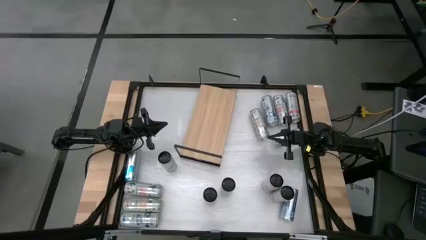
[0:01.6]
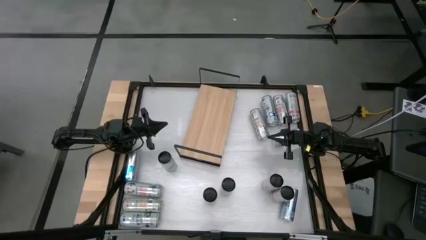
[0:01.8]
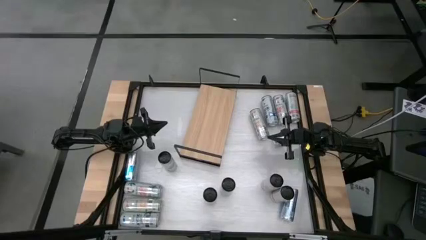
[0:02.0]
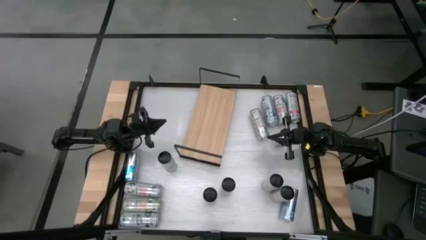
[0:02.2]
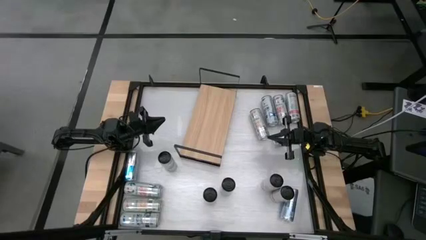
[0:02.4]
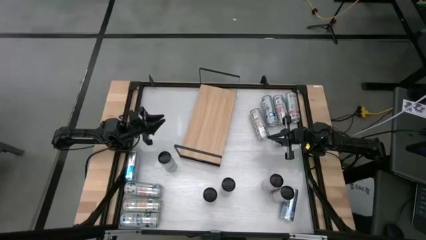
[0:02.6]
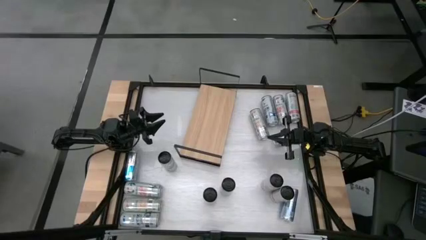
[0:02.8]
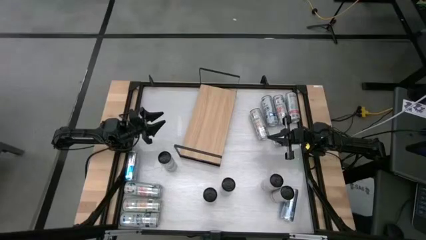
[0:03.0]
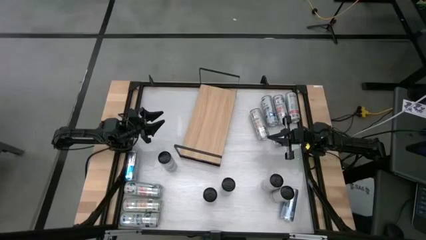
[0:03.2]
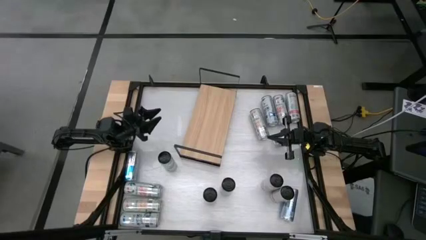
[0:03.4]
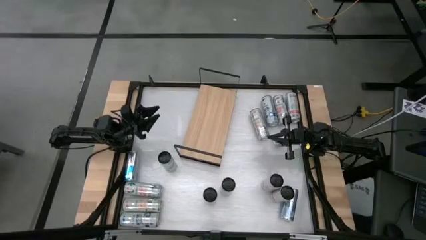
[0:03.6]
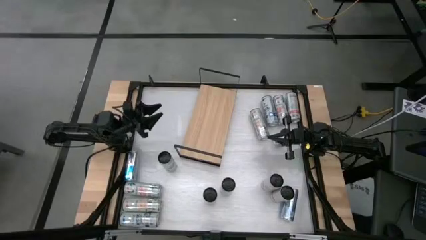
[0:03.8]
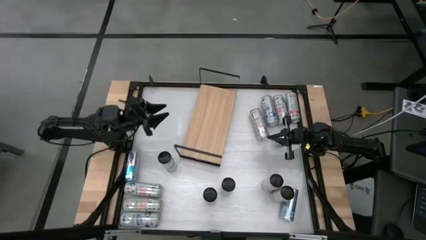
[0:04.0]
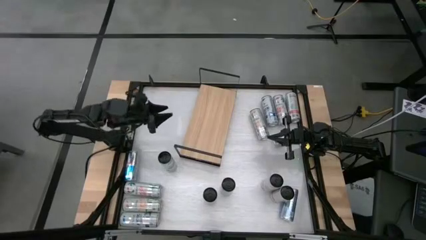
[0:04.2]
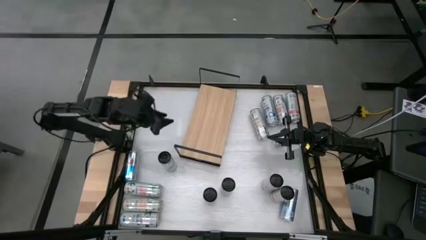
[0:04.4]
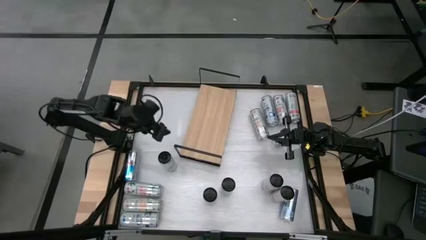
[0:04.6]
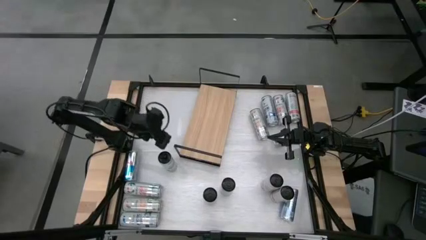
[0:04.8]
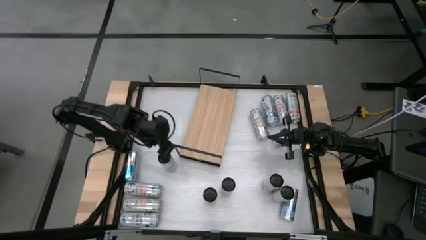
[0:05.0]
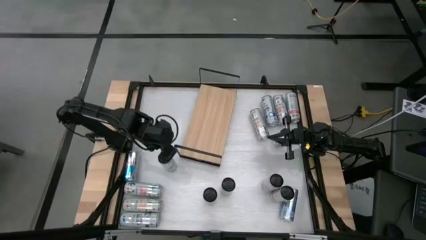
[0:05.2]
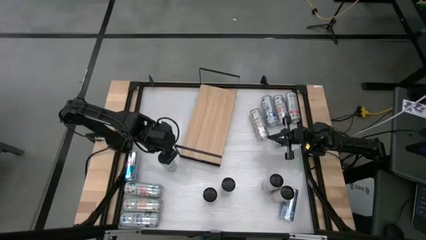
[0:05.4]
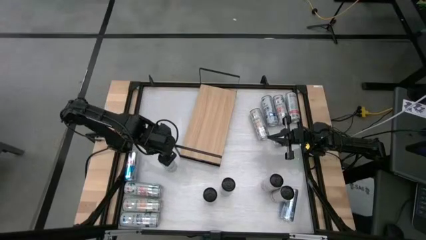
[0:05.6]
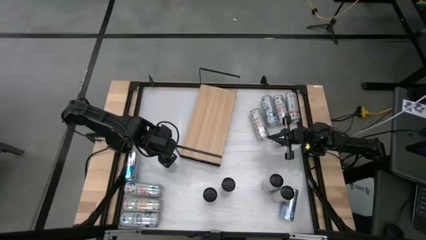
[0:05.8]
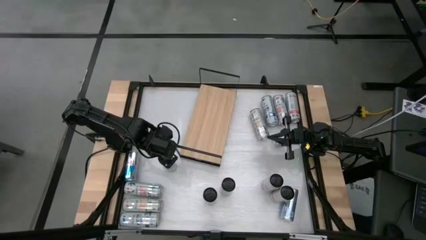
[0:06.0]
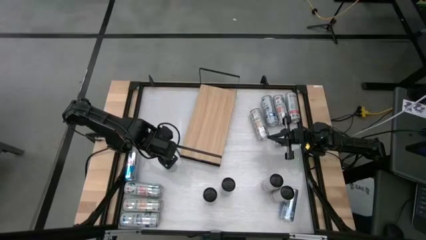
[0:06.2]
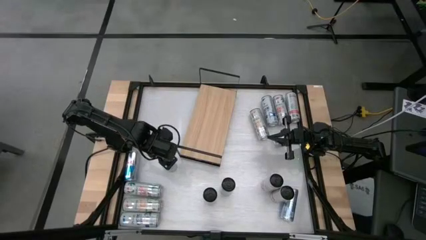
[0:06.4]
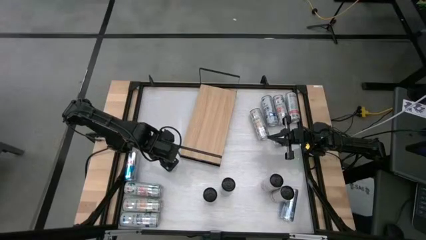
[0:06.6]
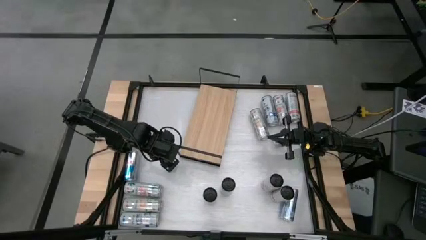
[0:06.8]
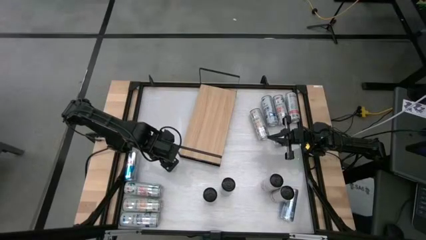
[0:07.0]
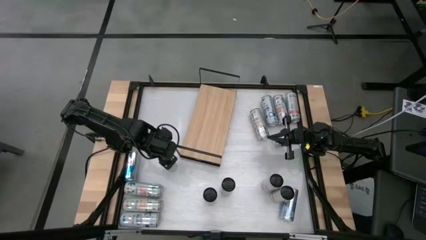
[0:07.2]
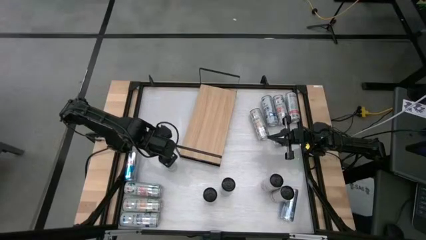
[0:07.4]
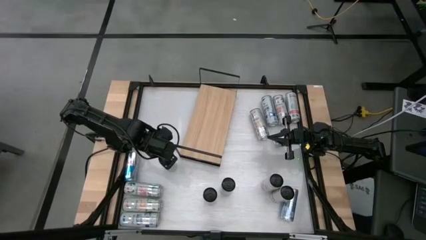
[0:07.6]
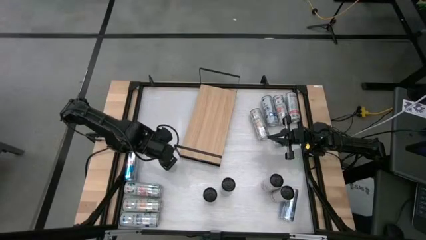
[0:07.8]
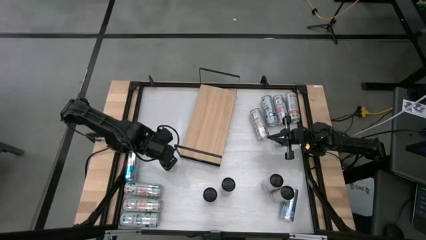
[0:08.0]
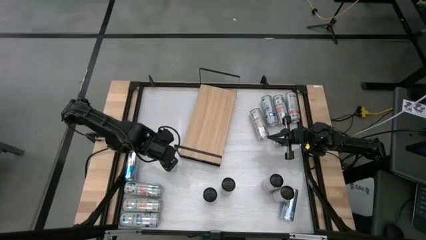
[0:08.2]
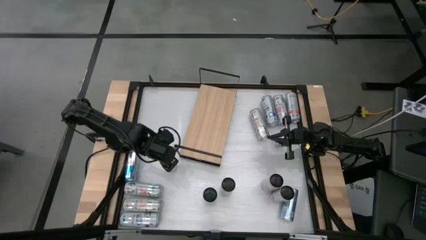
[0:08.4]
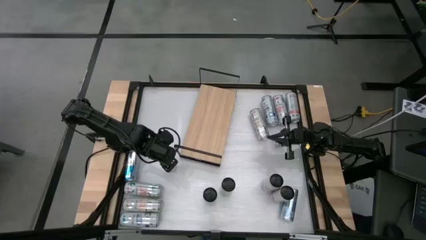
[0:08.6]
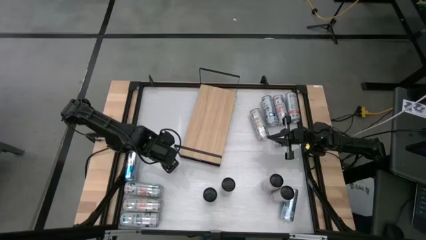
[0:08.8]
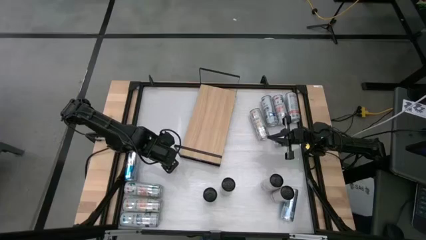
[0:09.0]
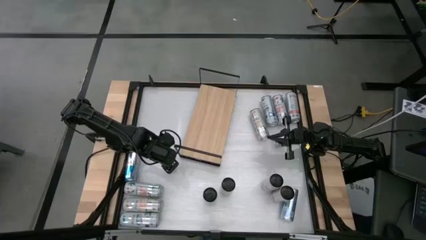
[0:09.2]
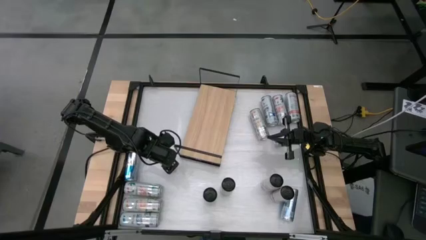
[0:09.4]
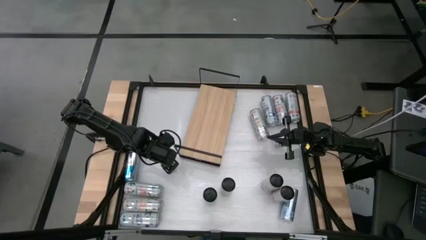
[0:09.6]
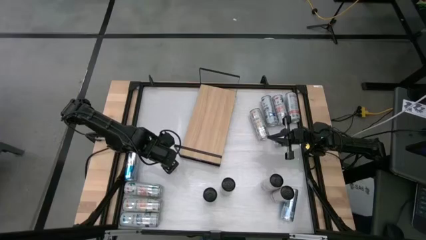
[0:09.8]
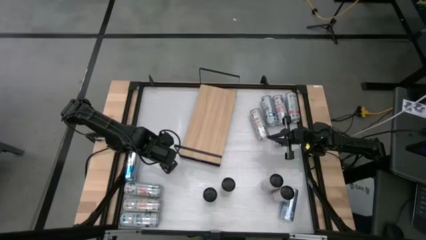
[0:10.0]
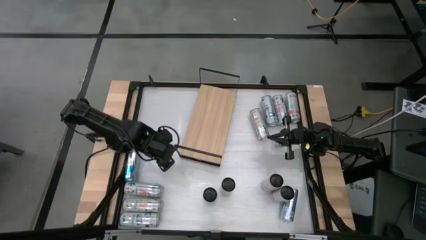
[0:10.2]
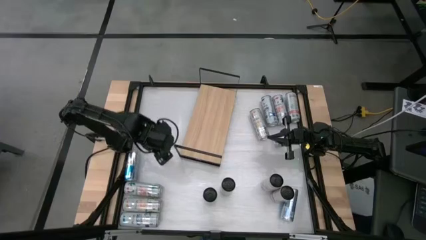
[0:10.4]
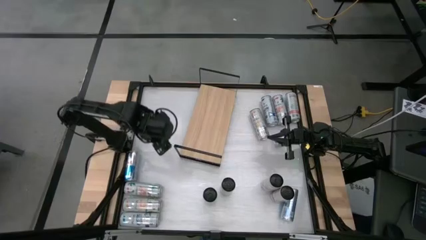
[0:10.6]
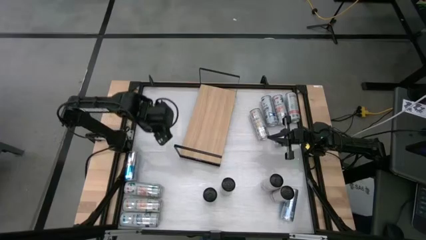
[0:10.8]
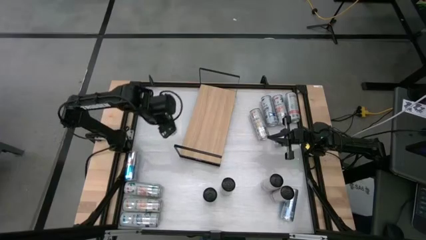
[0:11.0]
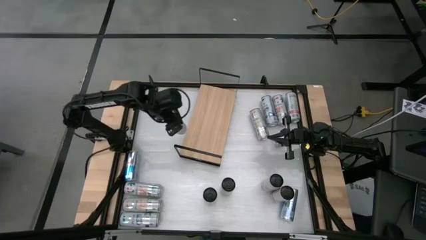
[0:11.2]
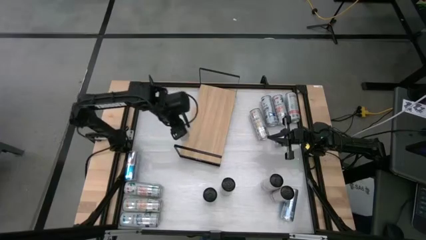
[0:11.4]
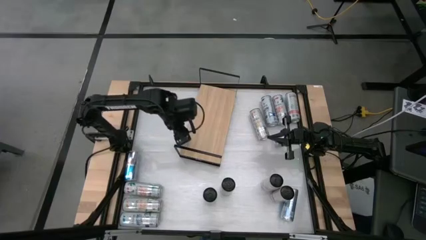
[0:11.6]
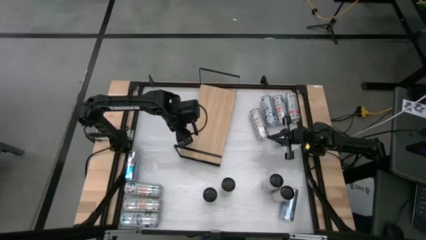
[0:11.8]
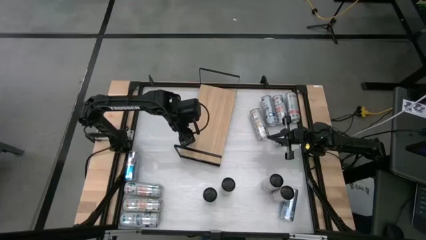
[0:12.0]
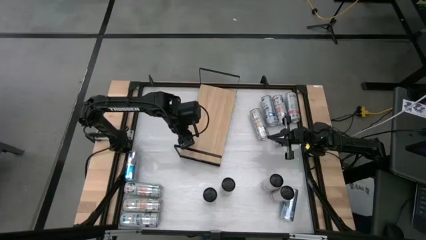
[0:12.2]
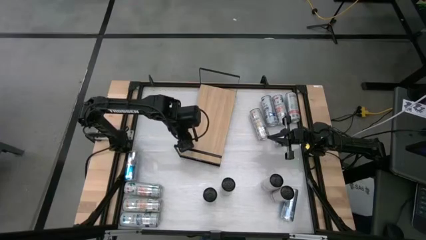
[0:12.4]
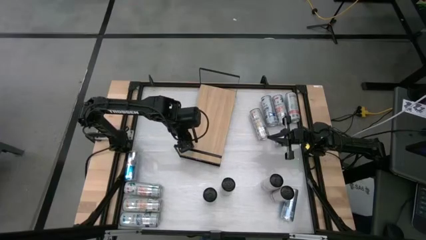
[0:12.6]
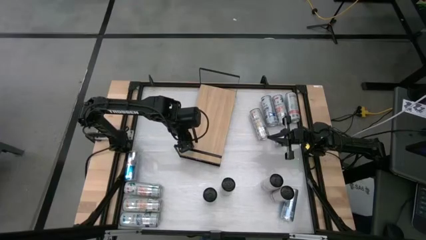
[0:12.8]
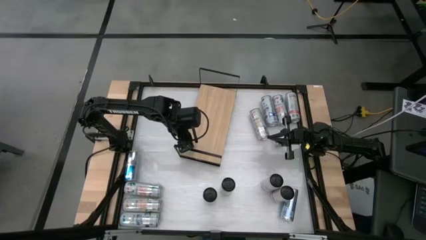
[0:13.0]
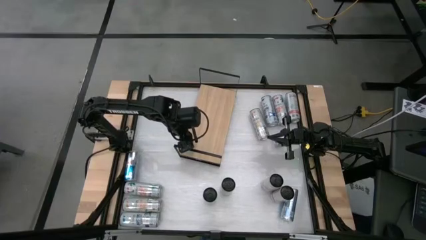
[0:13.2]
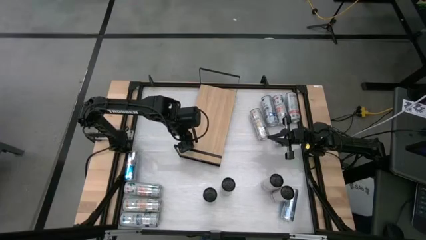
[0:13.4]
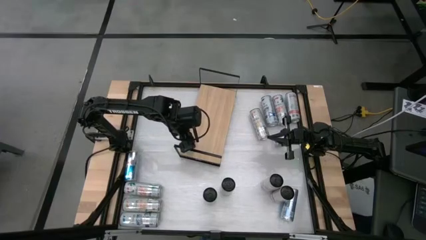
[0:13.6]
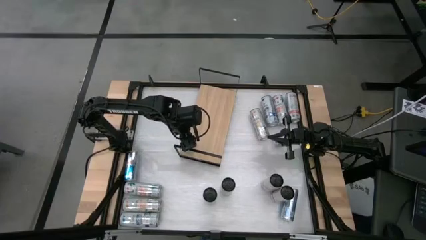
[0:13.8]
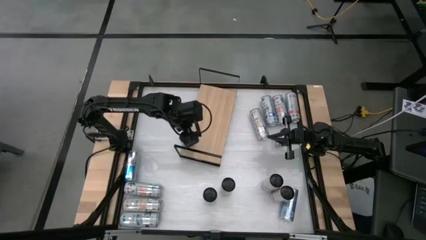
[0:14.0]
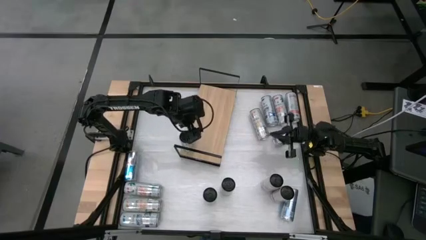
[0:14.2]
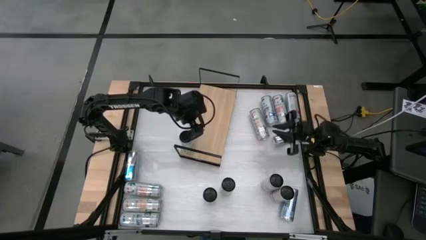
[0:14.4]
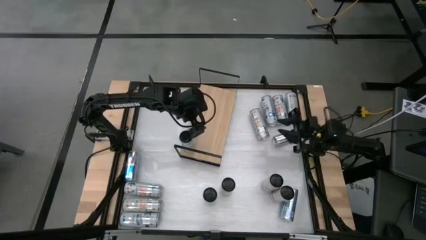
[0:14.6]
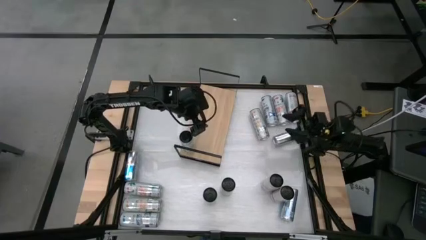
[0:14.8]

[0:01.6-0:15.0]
Task: Place canned beverage on shelf
Put the middle left blue soda can on the shelf
